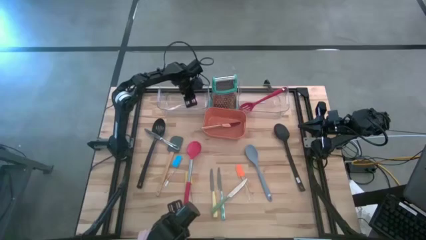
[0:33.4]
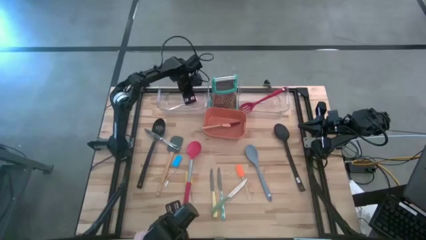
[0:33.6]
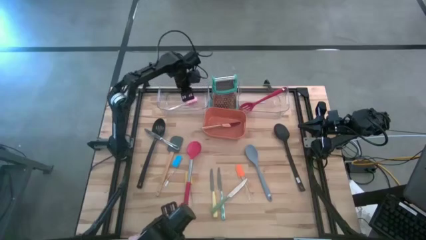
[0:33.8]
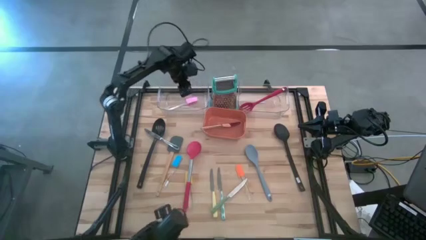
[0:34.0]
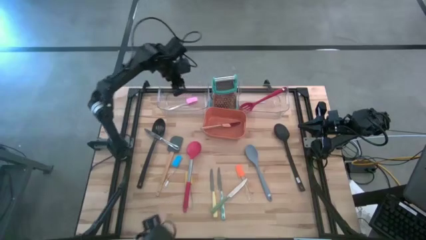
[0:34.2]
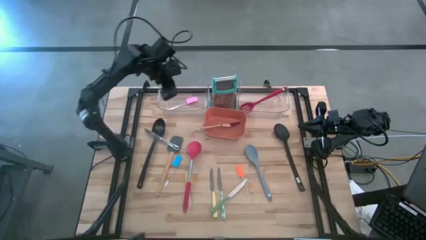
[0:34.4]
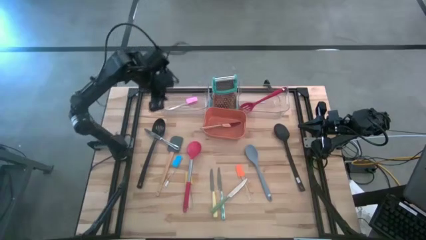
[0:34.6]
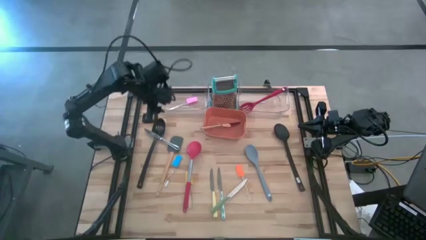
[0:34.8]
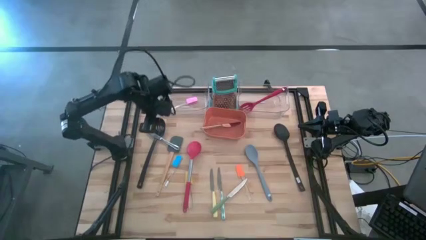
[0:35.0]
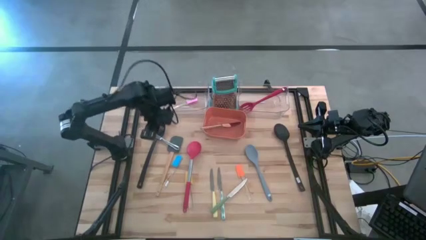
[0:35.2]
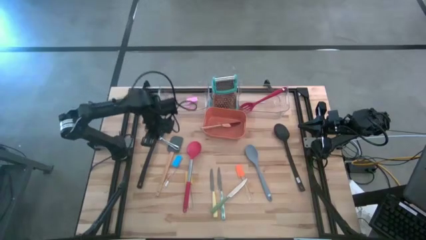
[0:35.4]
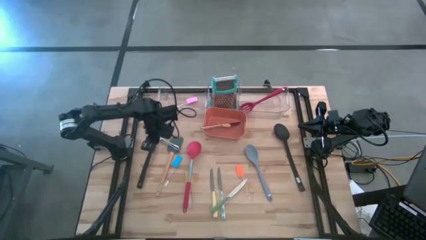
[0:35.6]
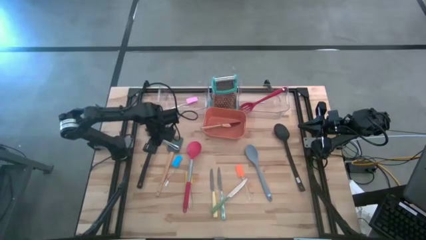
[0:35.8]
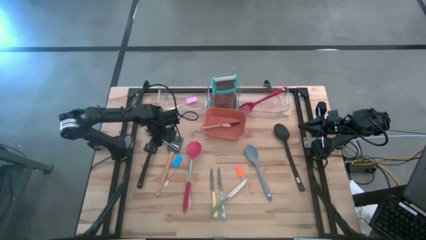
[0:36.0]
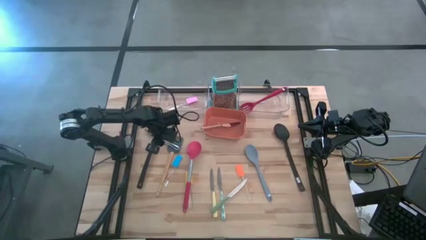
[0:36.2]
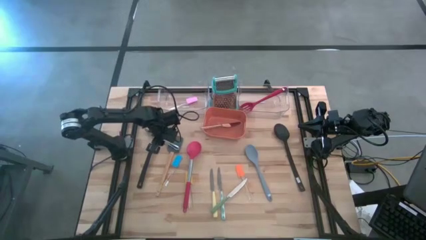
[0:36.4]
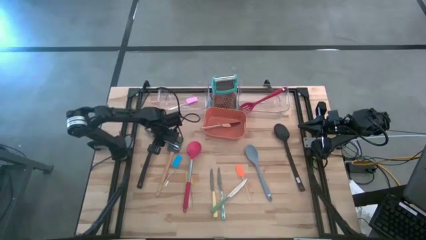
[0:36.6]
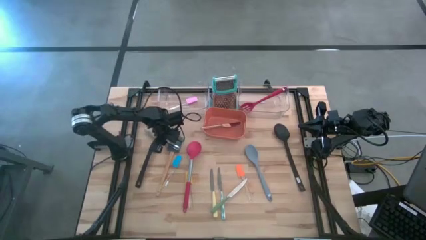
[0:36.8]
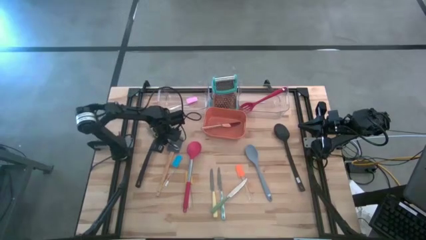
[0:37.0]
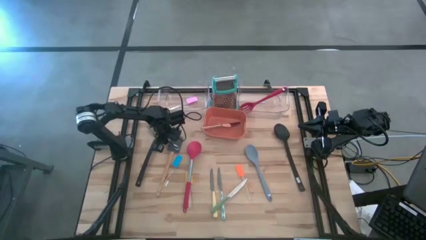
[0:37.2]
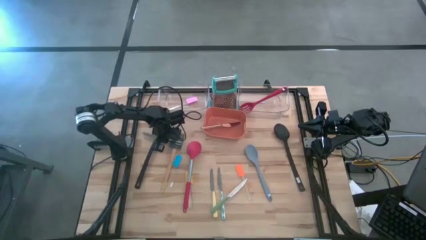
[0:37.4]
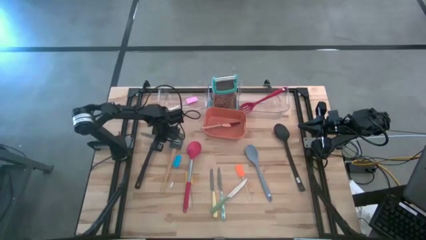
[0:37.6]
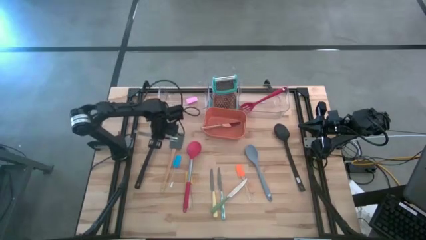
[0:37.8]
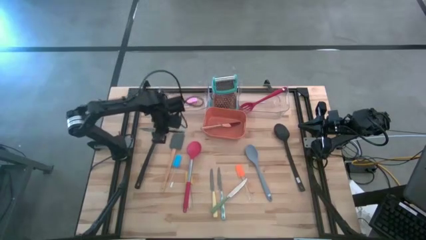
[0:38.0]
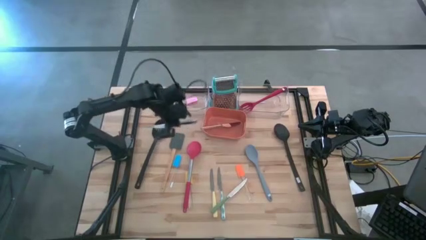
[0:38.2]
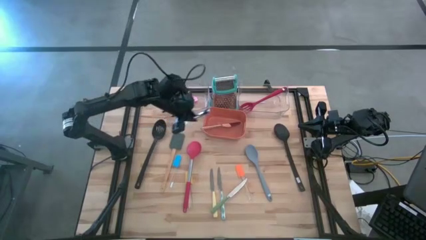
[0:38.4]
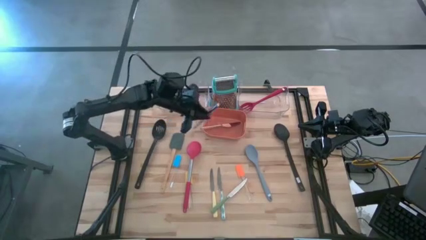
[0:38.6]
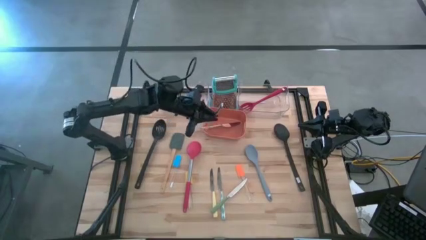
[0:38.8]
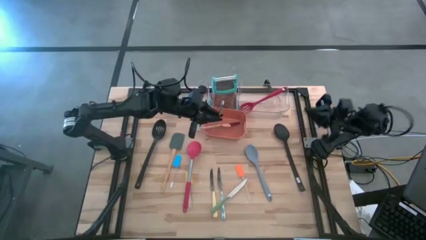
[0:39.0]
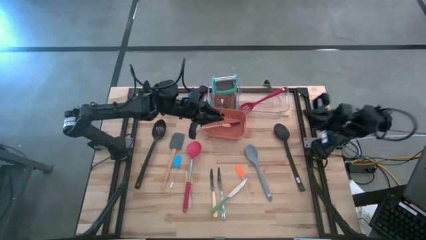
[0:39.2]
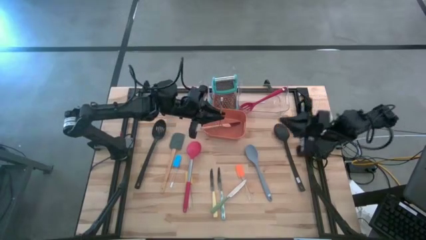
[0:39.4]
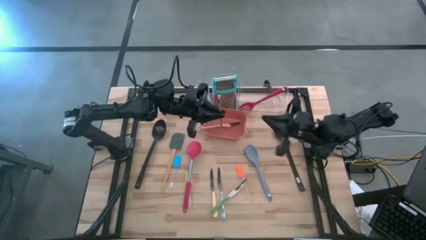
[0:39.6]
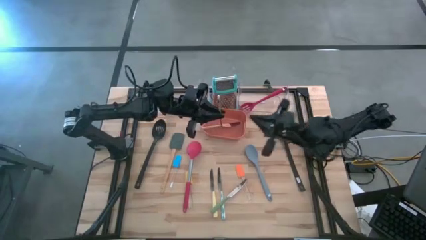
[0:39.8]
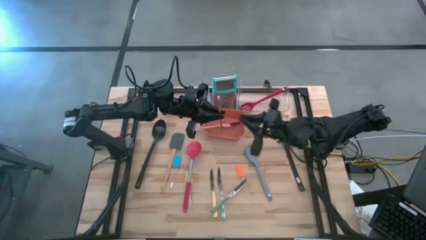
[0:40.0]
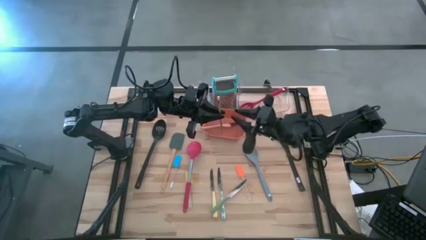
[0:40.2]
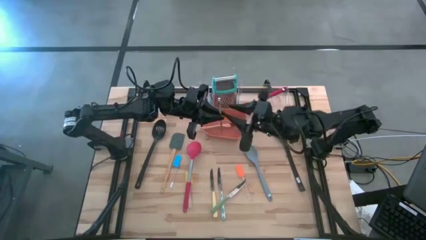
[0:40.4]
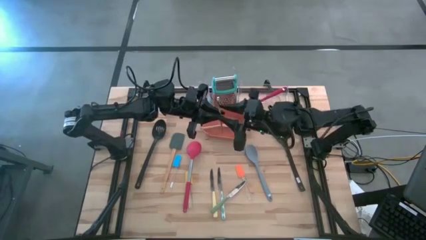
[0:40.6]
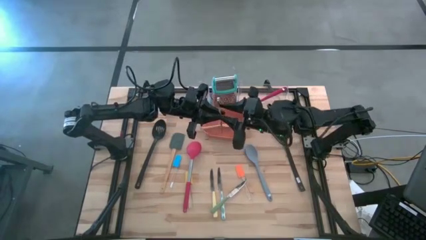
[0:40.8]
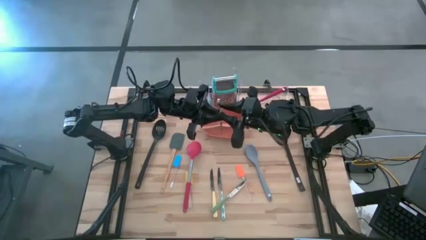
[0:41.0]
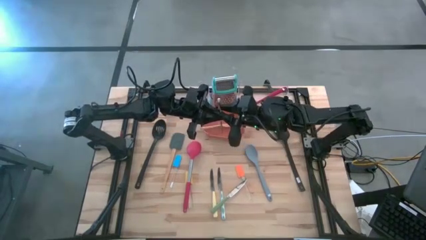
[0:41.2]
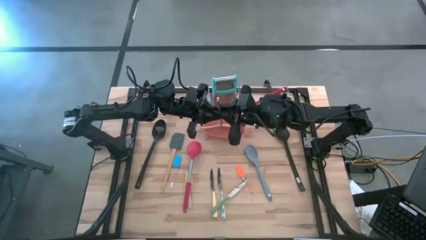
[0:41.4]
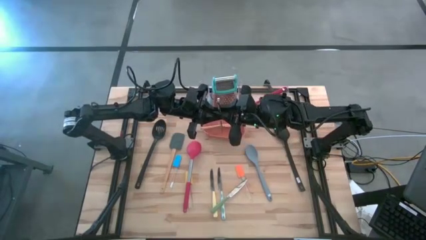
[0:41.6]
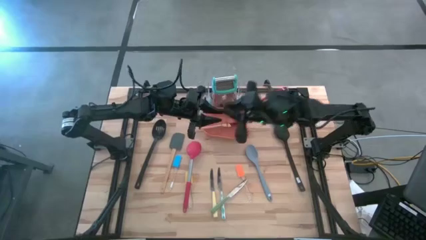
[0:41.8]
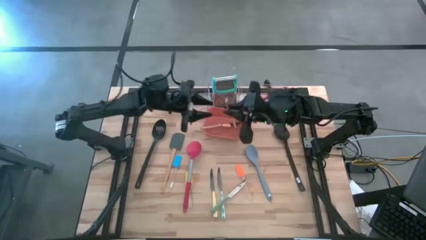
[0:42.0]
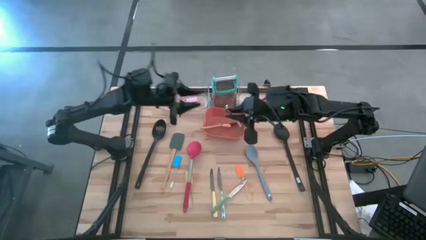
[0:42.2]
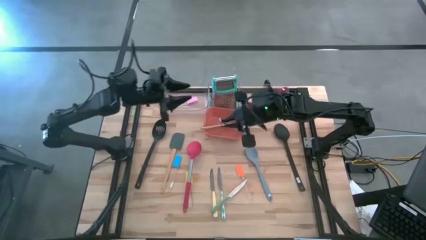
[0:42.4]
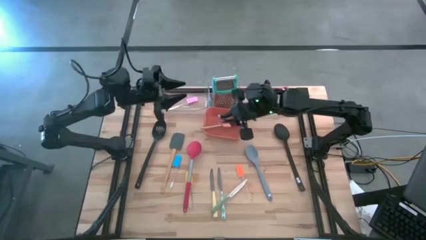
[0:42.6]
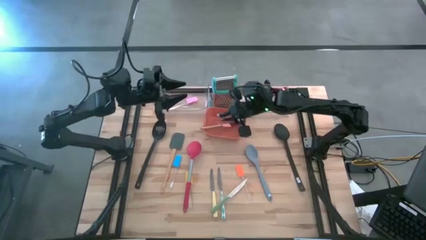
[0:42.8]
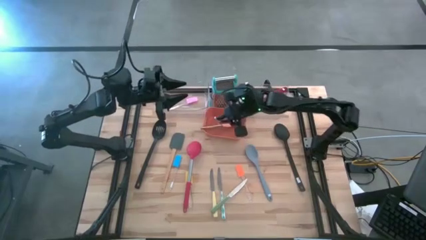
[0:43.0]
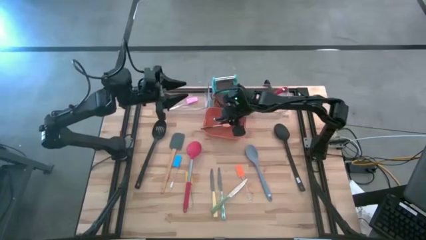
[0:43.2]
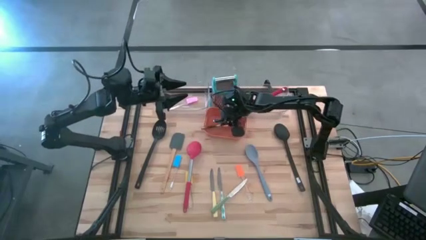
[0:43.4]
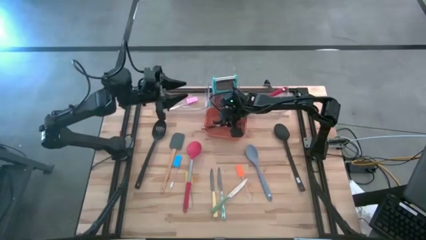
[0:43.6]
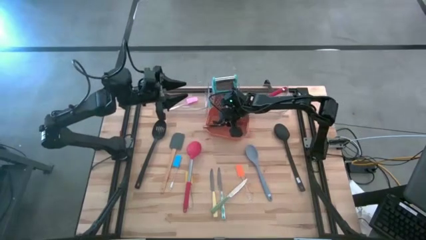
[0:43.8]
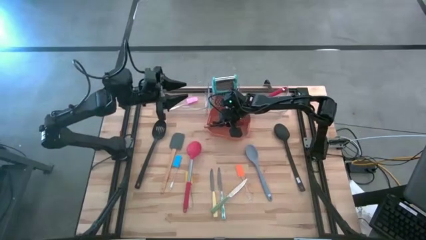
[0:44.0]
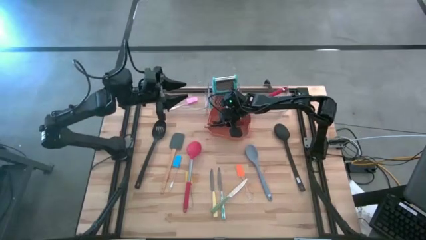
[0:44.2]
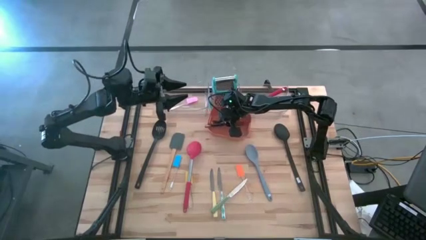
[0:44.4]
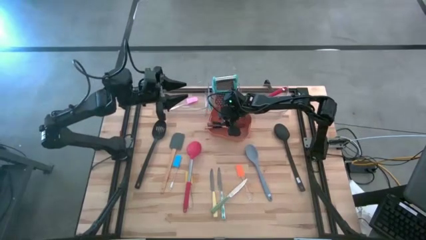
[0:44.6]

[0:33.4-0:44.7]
Task: Pick & Place Kitchen Items
Put the silver table knife into the orange bin

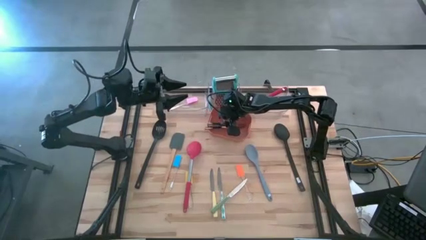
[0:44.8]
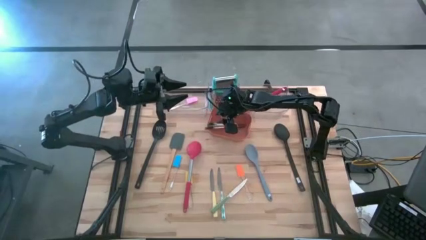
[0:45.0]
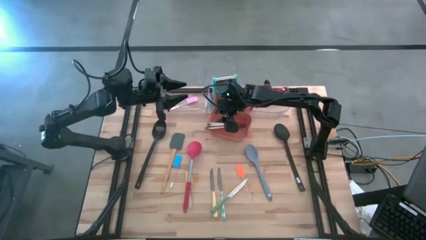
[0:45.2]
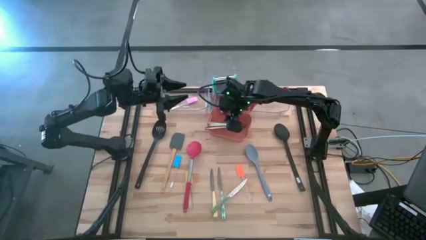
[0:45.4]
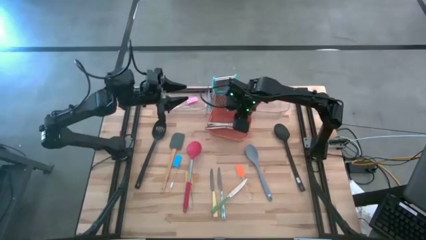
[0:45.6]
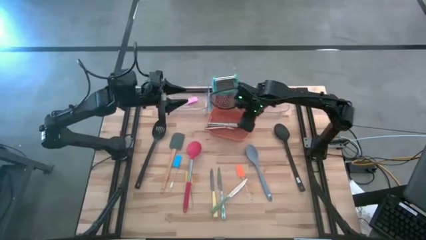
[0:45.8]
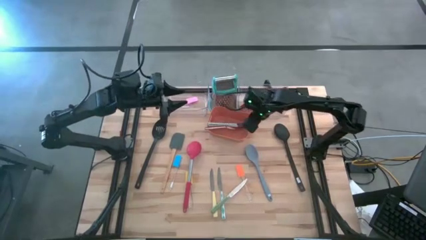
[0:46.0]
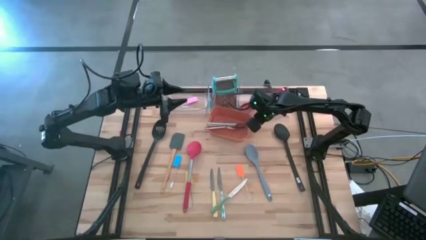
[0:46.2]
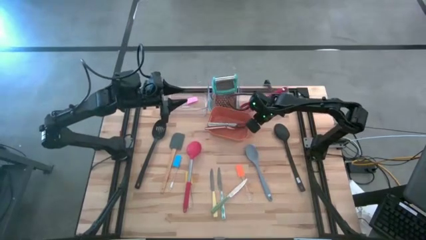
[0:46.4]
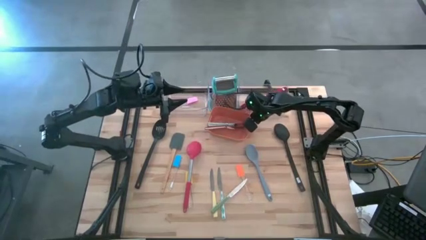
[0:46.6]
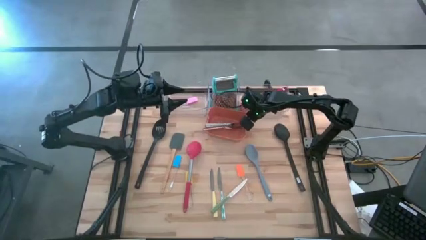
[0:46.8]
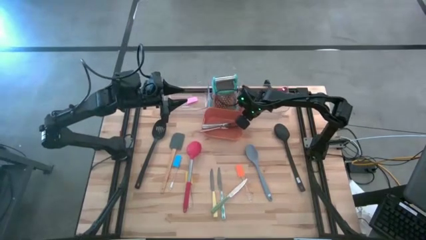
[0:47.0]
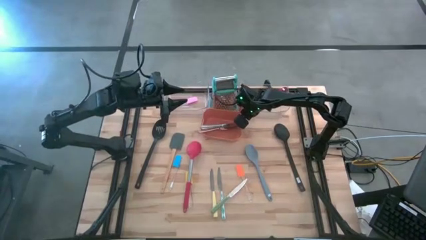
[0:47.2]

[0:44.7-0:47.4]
Adjust the orange bin
